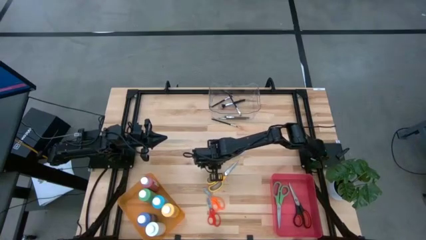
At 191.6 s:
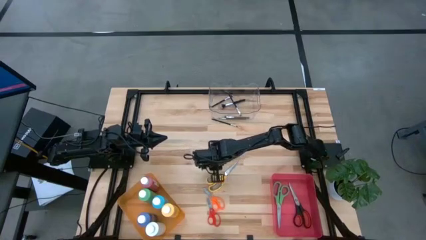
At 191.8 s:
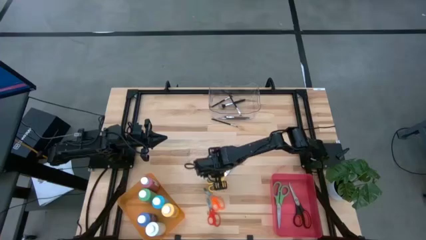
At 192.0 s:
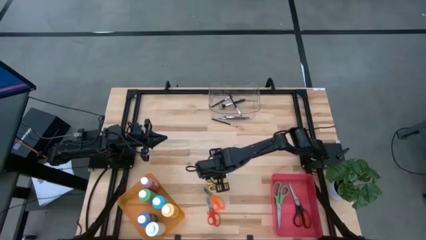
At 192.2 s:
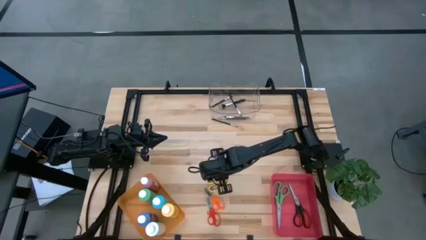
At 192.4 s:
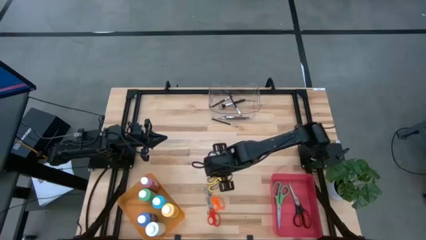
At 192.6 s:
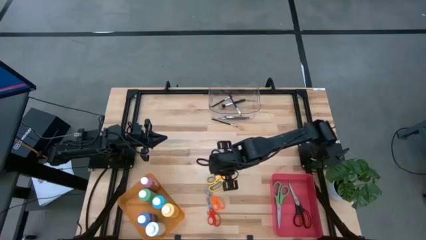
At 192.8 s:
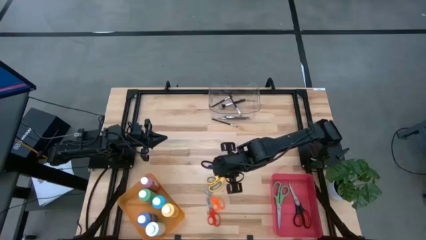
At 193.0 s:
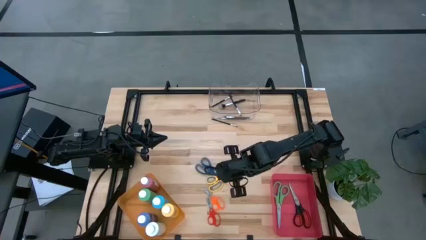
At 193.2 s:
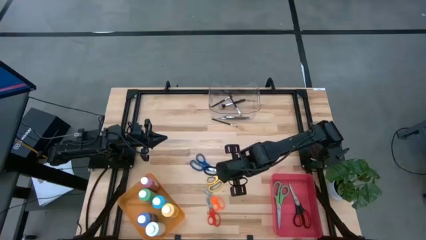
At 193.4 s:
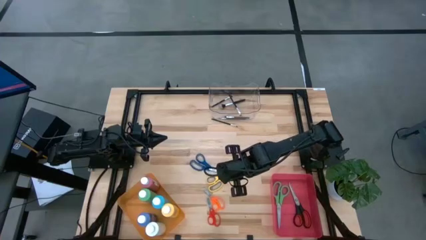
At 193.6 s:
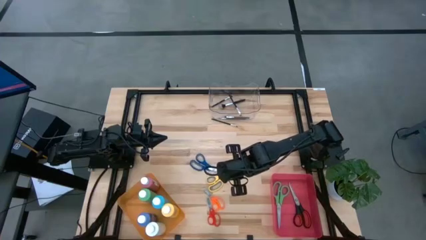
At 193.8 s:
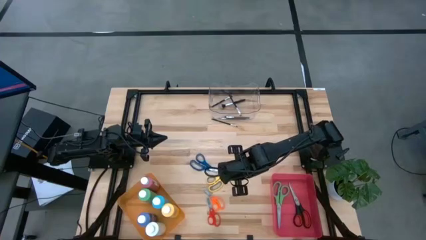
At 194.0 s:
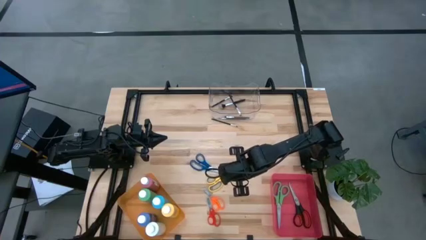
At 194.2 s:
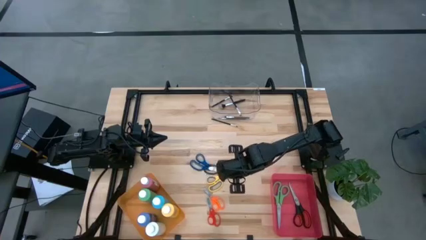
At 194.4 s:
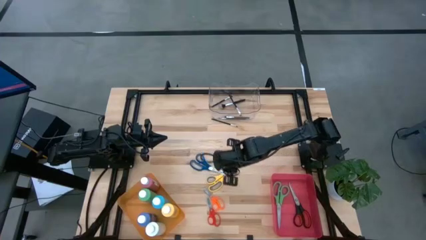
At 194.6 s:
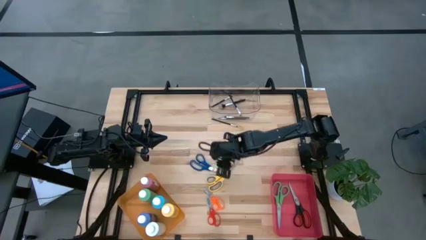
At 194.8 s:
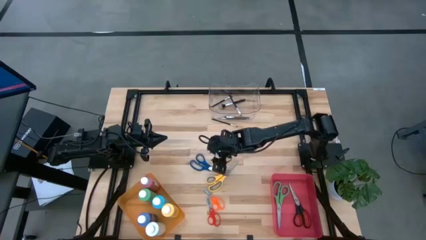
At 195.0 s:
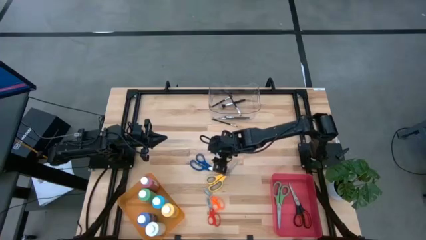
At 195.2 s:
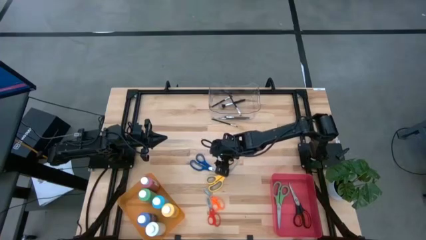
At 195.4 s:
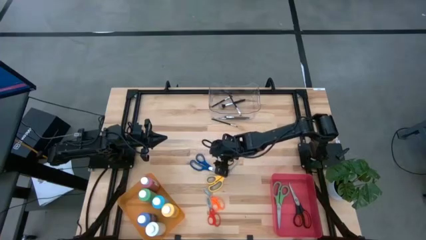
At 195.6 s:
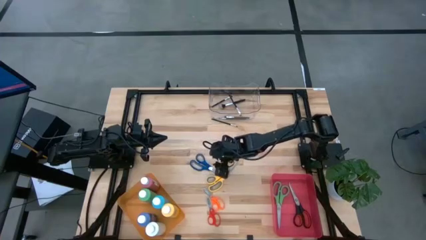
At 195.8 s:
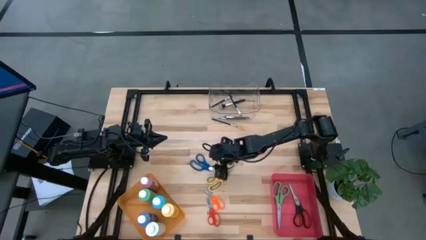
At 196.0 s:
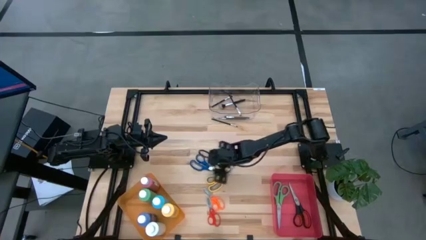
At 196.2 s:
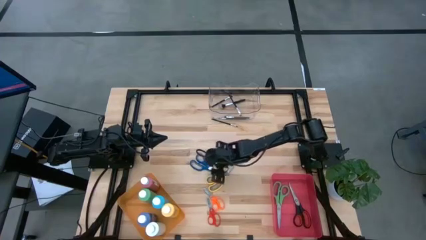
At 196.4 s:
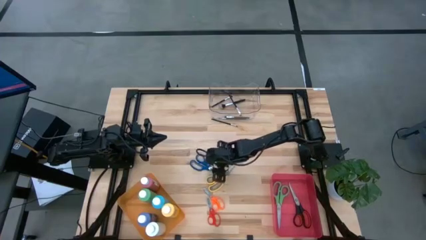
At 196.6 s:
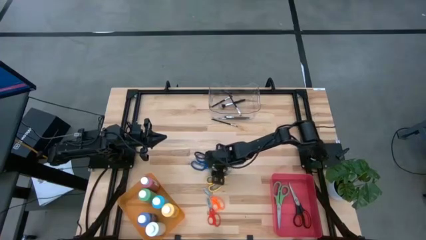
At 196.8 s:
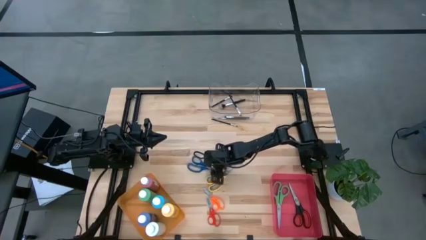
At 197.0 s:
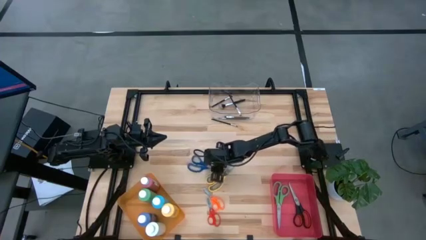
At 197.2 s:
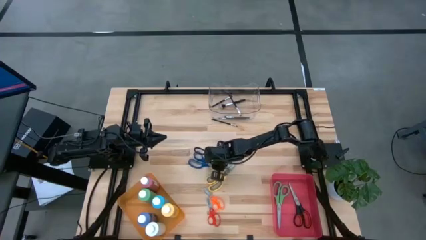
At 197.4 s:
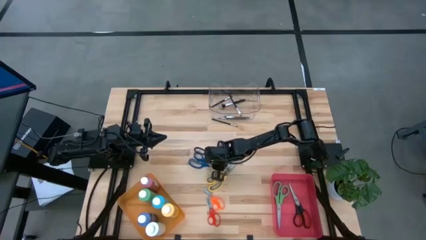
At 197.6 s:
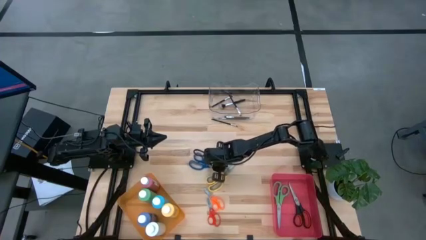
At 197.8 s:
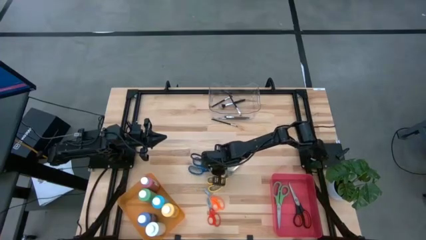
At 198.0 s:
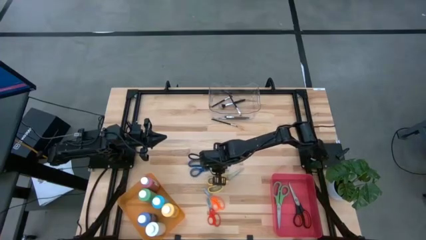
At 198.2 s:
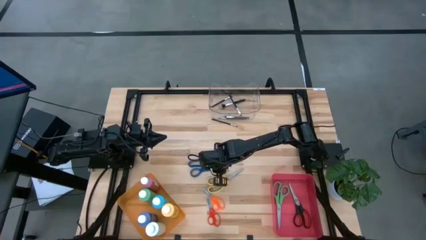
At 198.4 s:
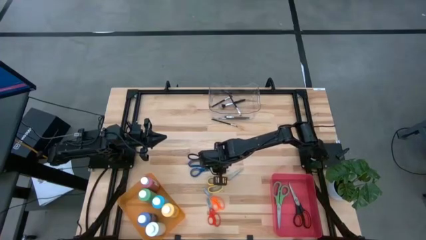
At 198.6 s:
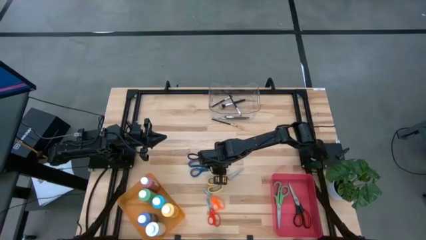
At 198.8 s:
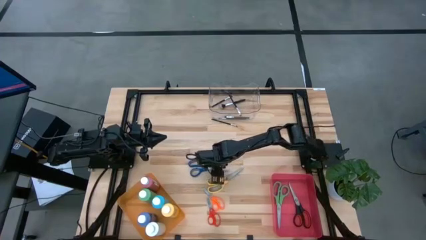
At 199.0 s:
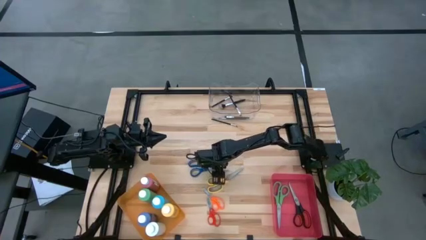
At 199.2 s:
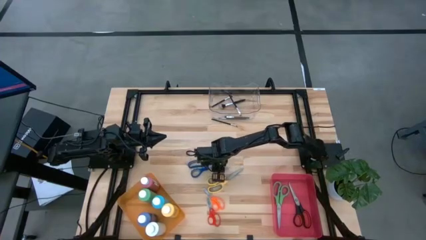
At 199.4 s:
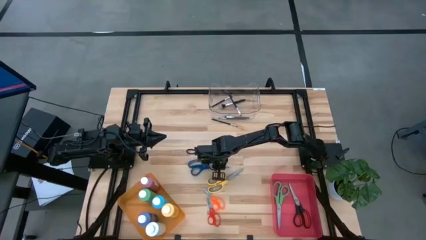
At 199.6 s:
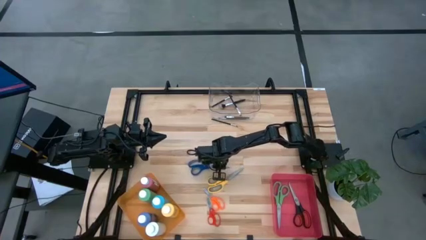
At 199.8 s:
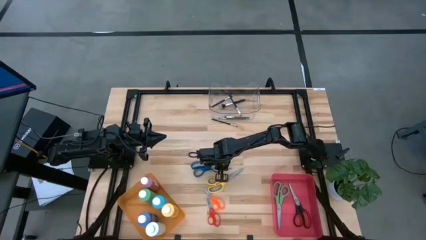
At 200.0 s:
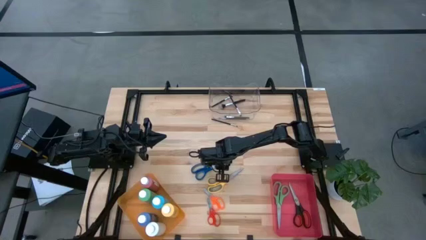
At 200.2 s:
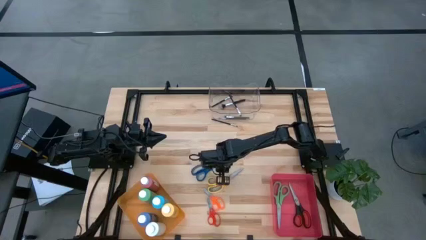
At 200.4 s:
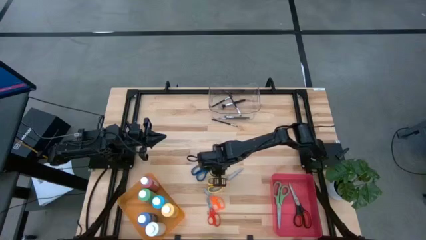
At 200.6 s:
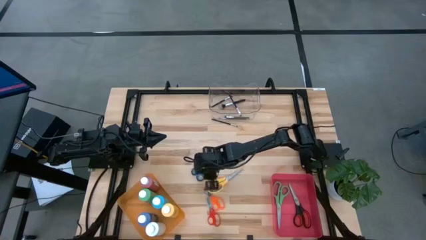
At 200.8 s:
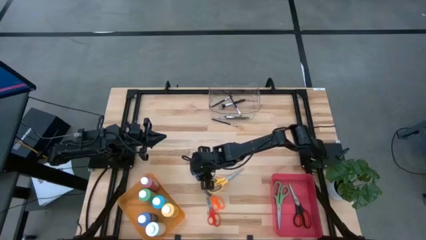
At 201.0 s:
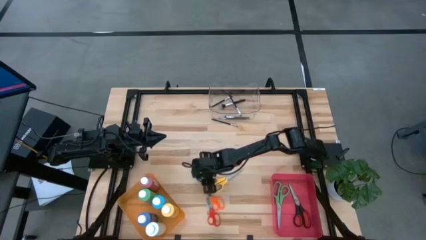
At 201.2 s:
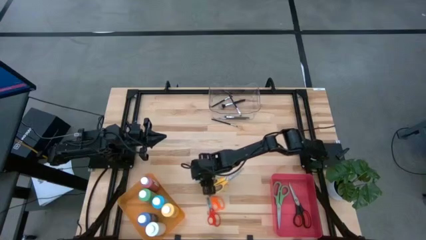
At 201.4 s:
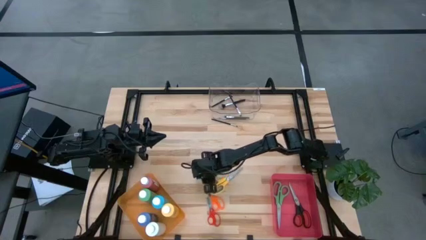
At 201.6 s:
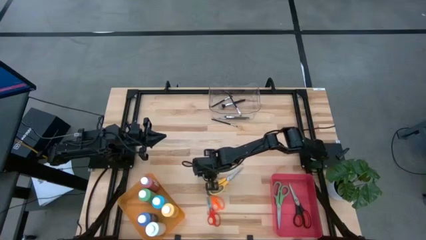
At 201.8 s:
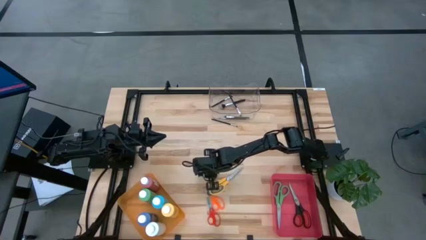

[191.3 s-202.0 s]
Task: Pick & Place Paint Supplies
Put the blue scissor into the red bin

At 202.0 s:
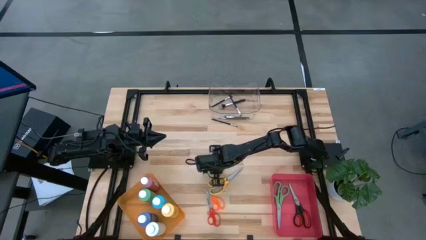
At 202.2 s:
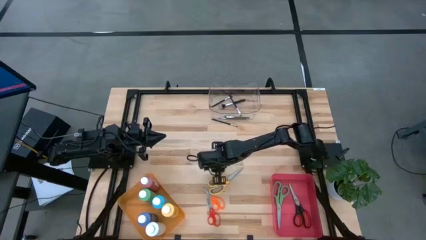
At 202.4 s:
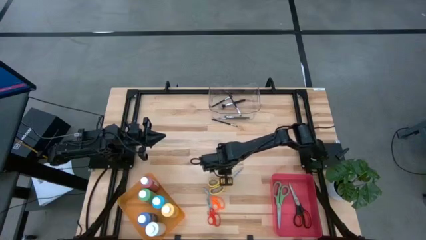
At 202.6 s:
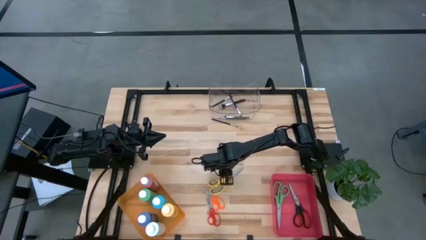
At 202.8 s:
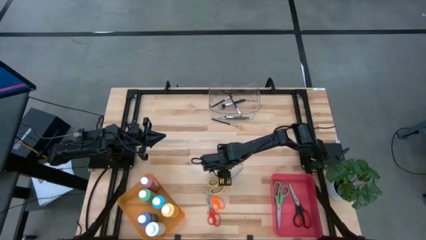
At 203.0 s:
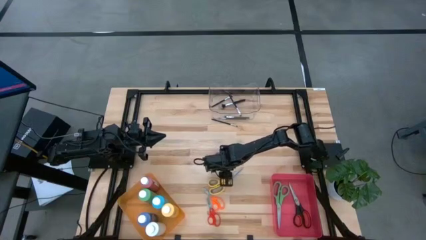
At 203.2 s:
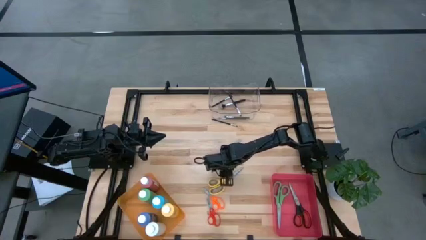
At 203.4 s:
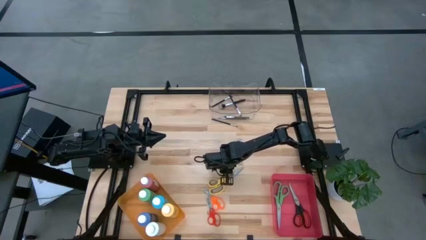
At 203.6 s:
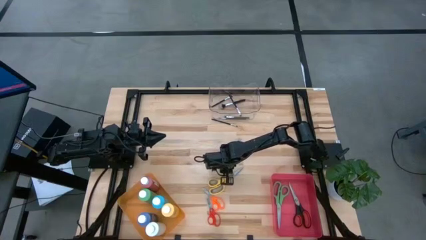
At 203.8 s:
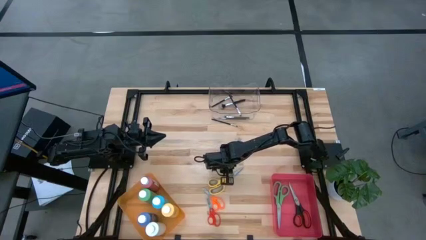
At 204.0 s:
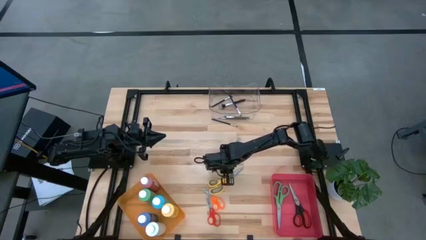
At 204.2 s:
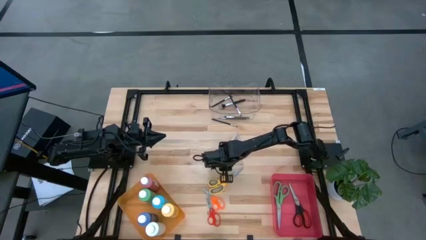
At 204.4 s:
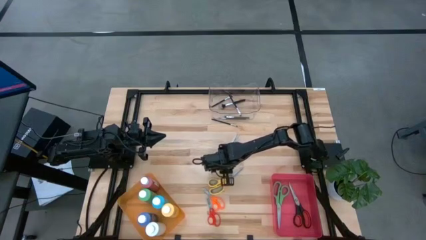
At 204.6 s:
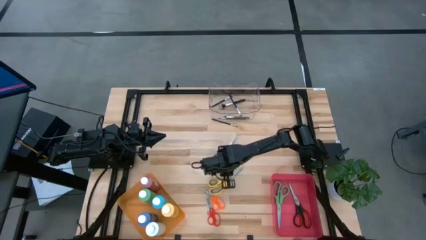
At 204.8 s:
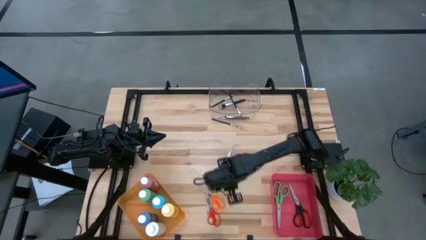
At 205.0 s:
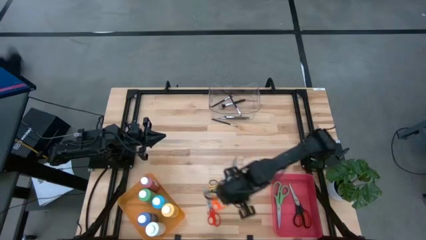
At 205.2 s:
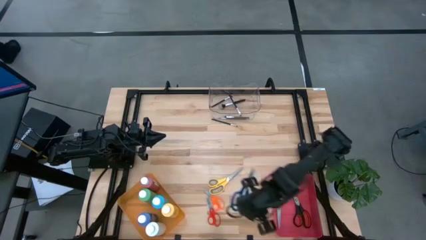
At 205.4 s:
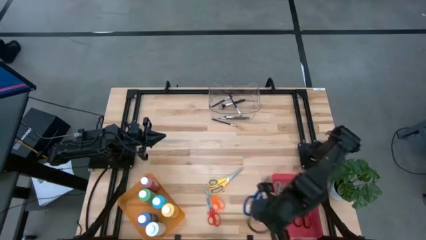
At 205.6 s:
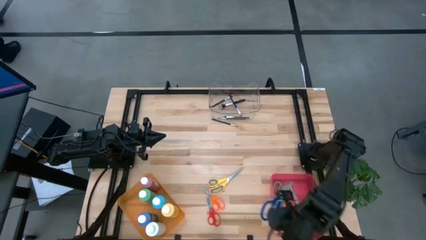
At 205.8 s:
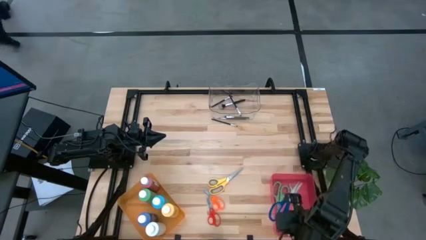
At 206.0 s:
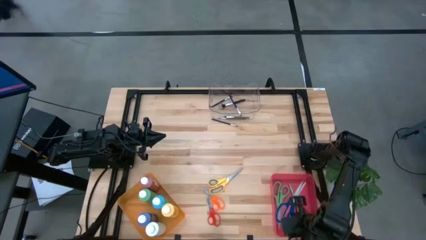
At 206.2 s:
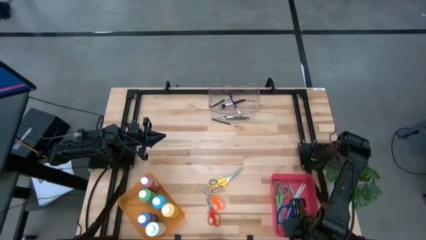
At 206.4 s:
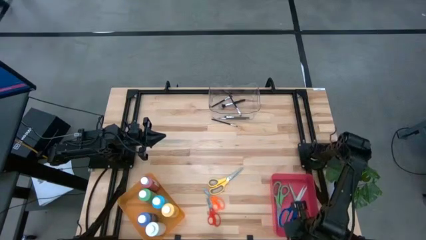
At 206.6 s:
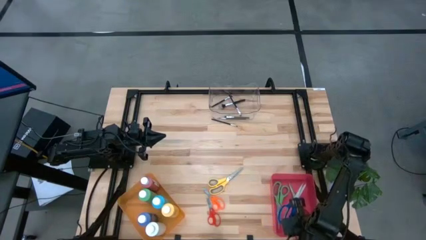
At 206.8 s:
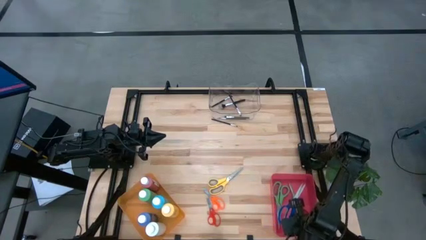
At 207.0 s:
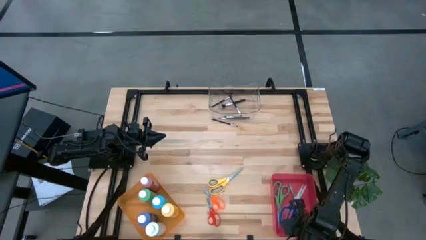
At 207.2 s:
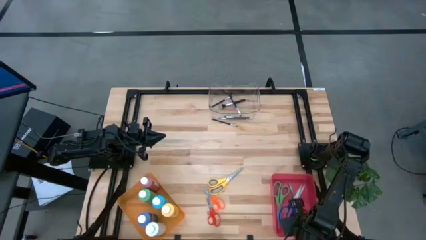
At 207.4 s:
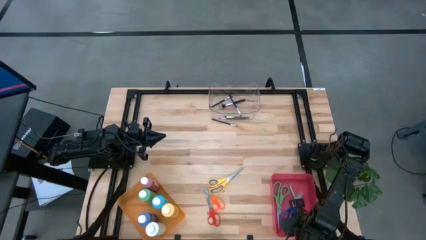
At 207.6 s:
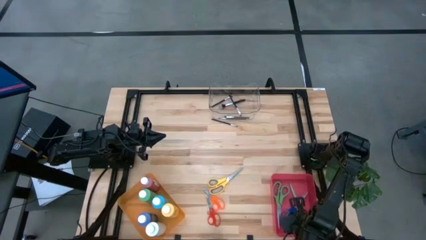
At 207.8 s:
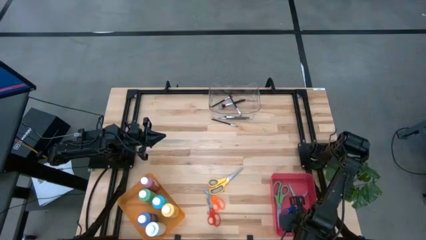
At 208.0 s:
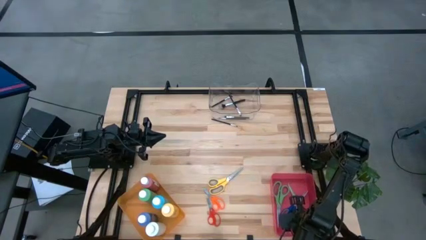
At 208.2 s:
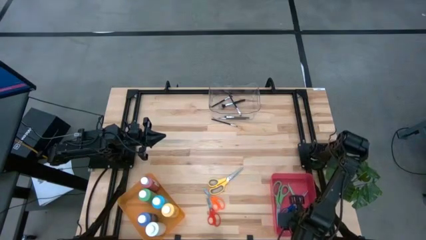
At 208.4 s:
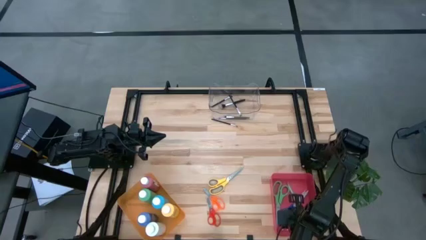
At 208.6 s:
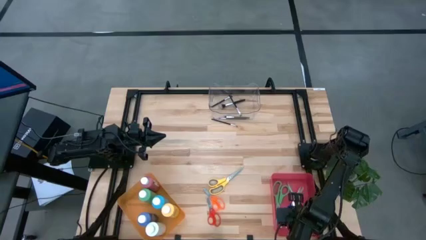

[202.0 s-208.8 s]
Put the blue scissor into the red bin
